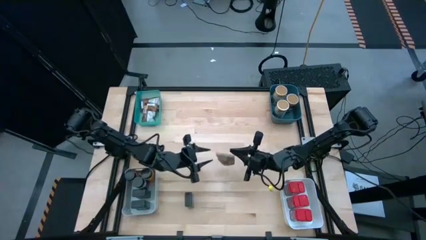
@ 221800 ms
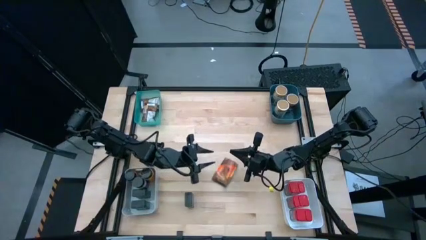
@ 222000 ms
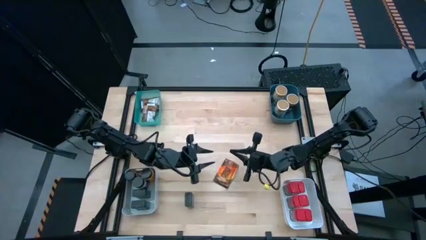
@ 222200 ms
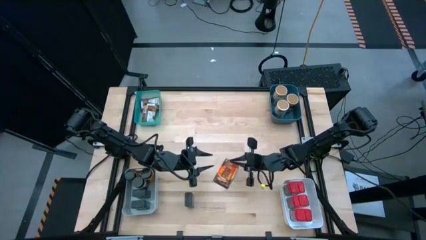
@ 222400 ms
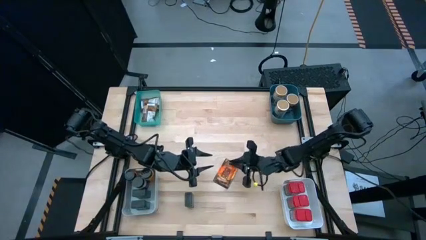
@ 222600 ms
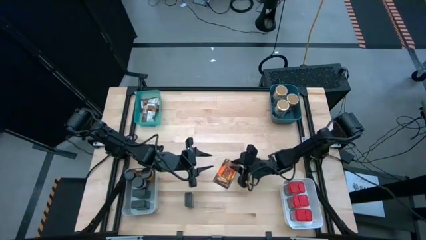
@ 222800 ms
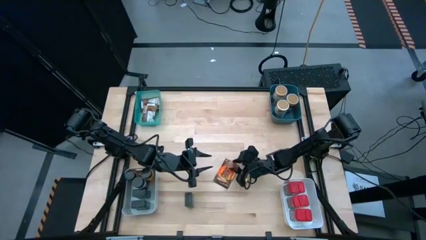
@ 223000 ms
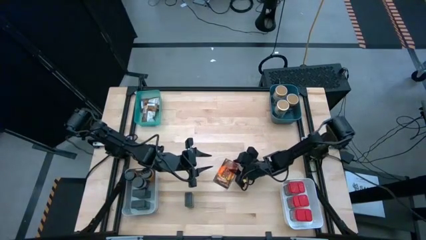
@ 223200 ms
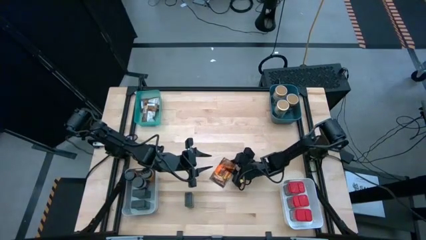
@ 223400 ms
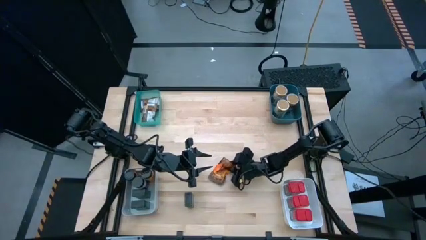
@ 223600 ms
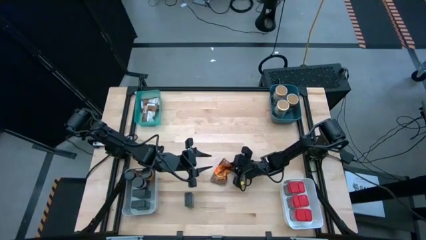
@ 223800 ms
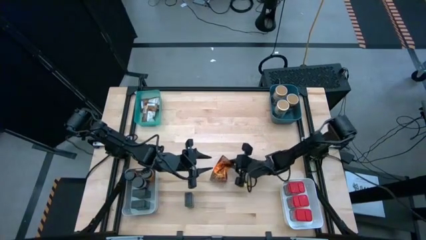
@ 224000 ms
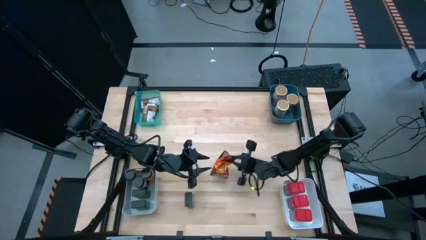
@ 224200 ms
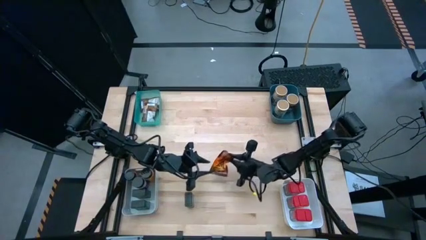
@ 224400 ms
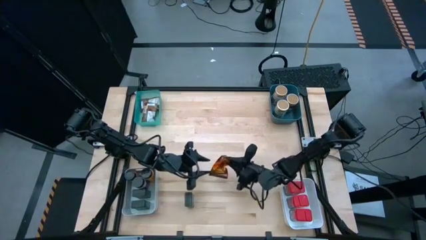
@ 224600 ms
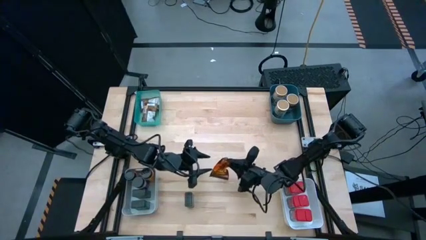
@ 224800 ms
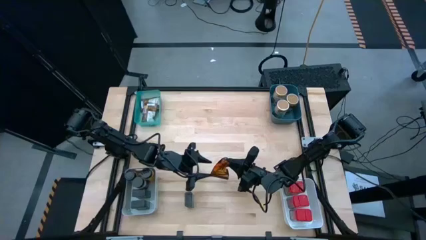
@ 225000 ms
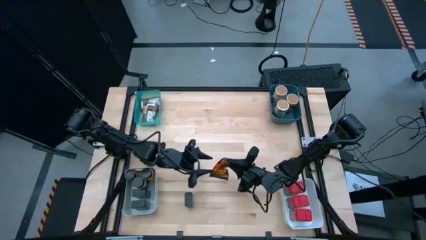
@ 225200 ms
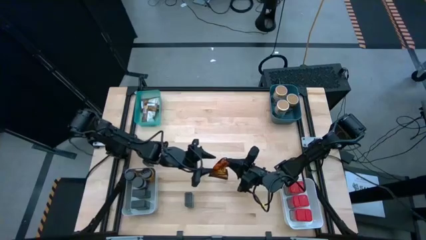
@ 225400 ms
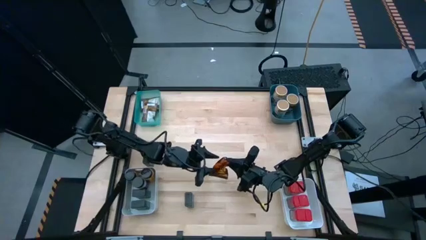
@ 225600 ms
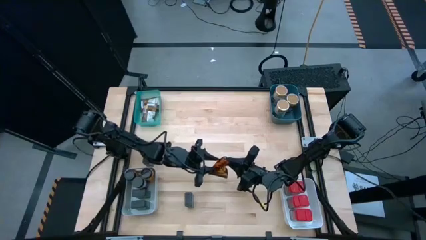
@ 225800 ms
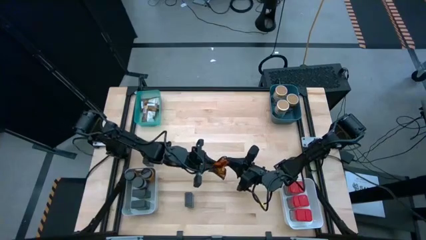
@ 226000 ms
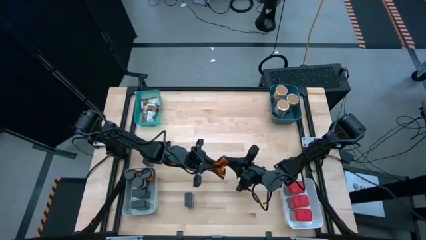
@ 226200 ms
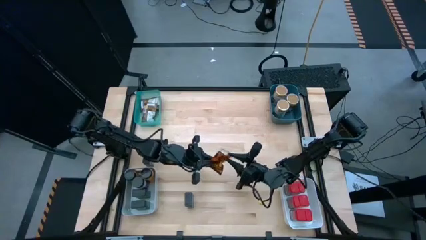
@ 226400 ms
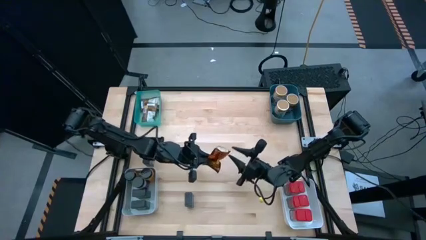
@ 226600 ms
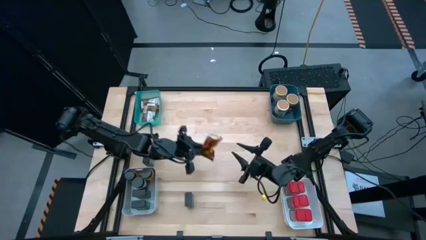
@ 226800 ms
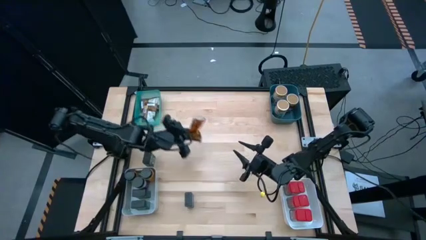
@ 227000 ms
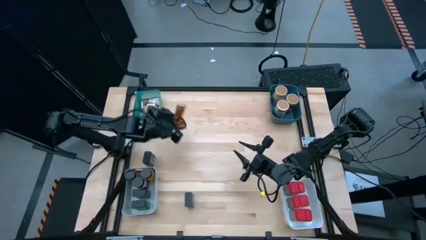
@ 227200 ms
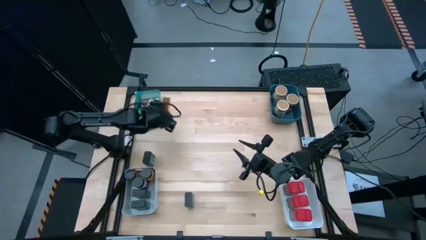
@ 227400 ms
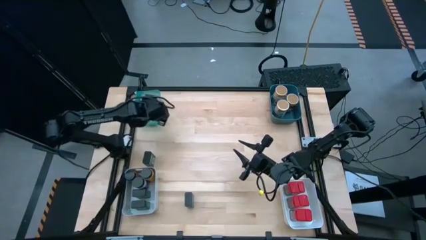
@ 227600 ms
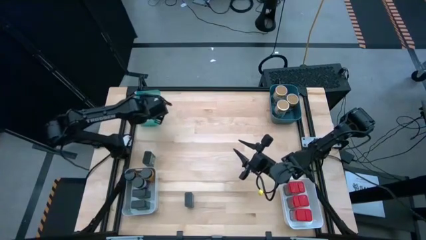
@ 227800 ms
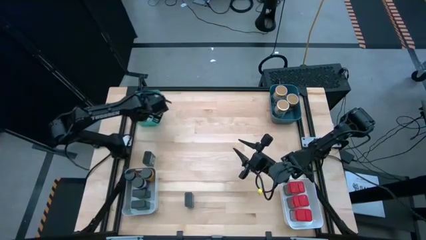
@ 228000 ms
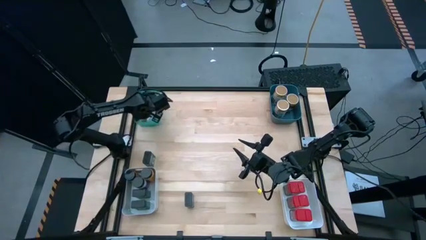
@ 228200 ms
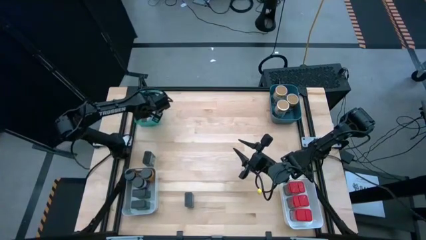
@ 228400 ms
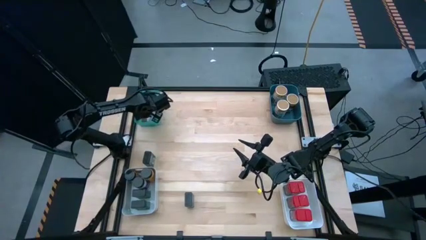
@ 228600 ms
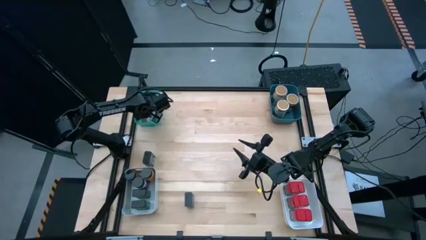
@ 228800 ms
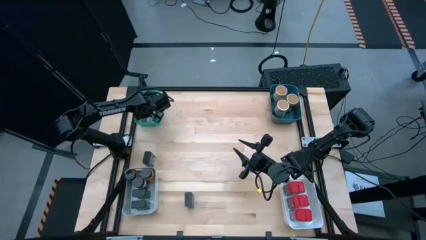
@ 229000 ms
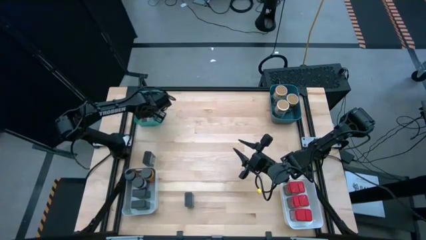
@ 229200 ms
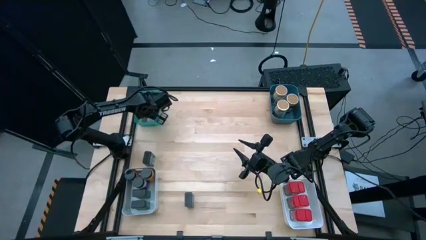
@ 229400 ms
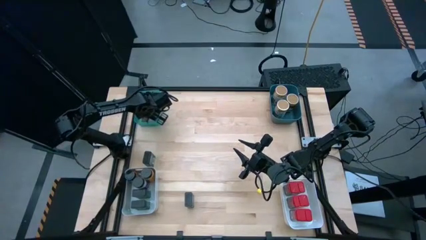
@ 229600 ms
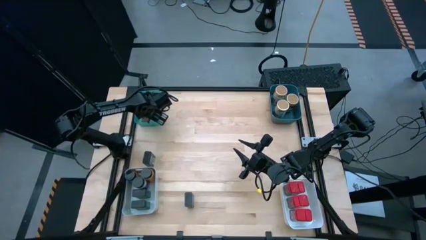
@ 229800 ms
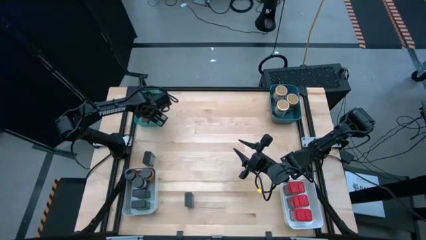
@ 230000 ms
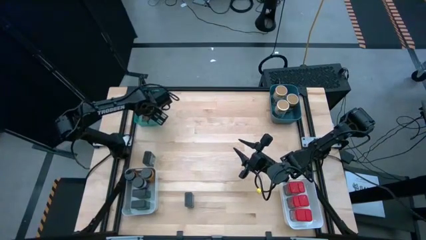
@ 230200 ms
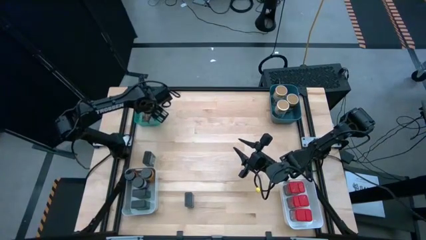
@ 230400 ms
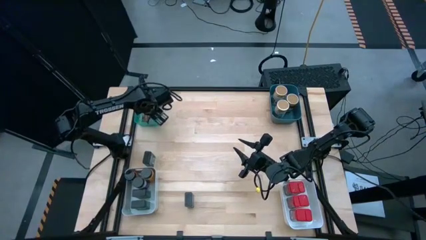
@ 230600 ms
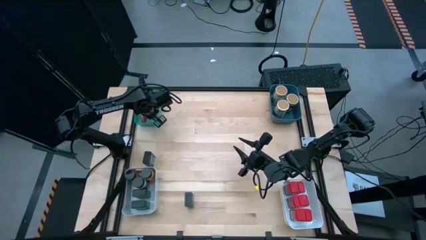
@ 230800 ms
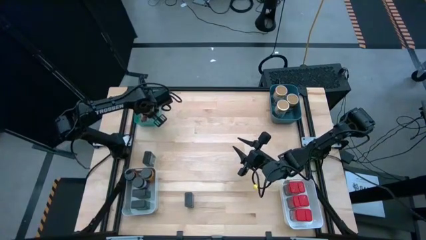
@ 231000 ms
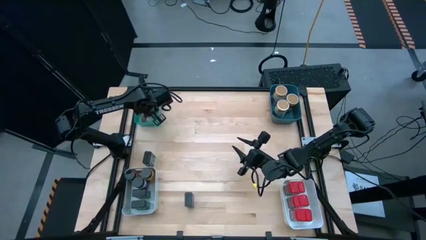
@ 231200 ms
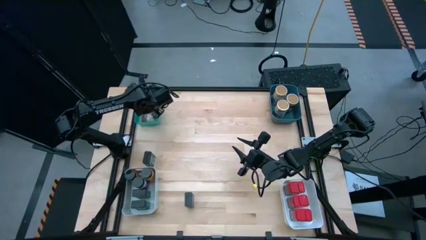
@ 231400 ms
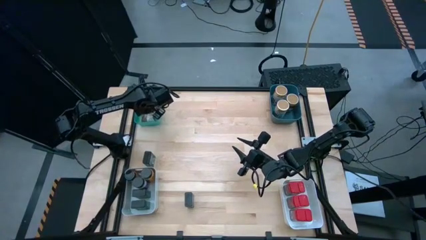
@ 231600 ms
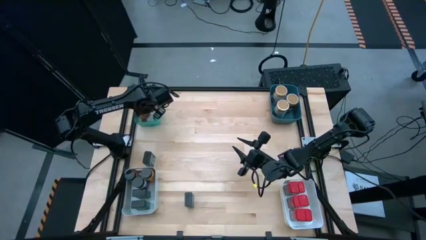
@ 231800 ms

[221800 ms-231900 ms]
Task: Sort spices by type
Put the brown seasoning pack into the light green bin
